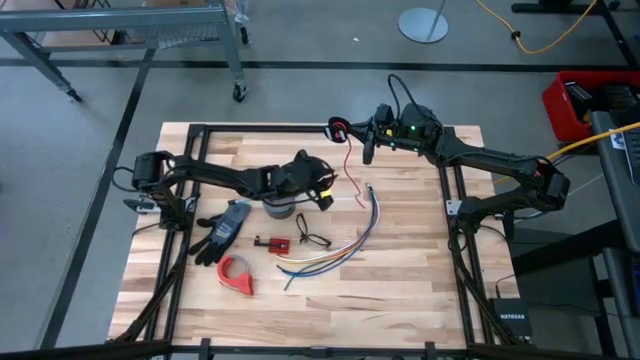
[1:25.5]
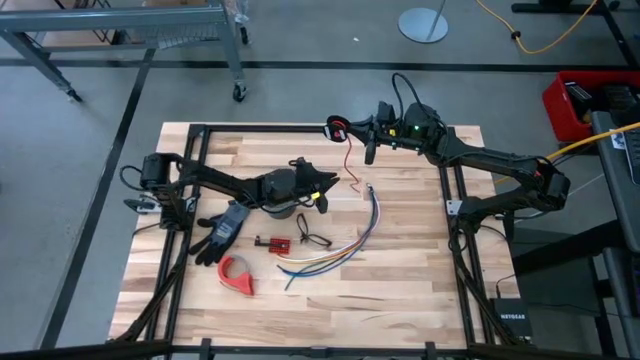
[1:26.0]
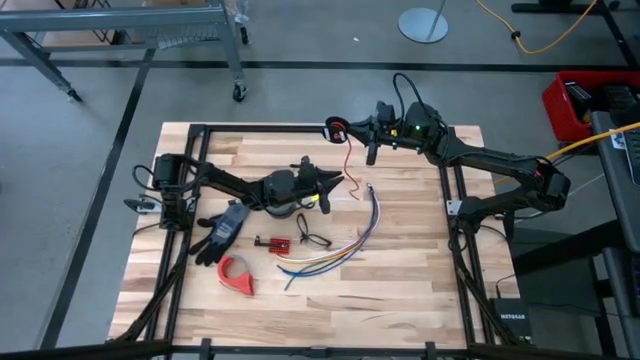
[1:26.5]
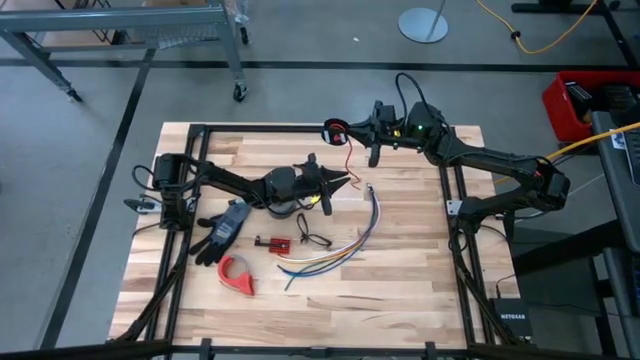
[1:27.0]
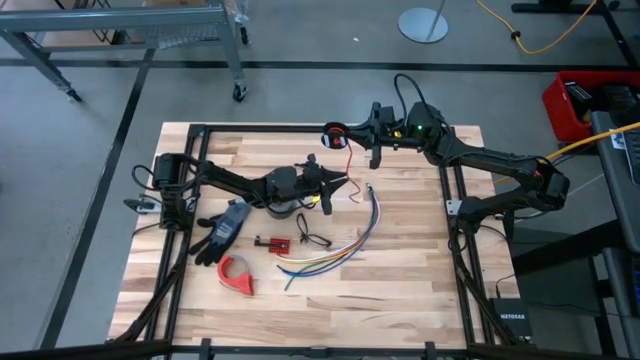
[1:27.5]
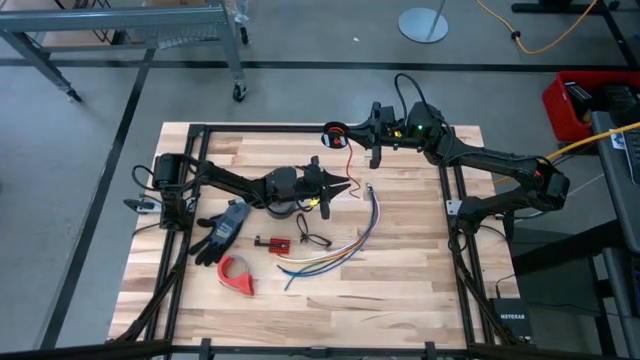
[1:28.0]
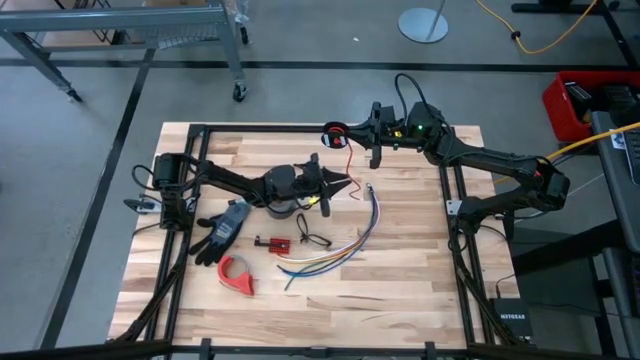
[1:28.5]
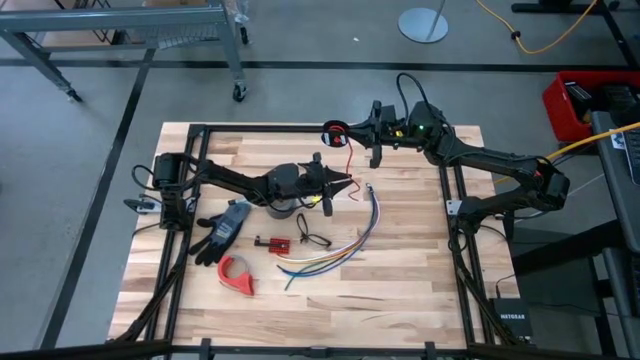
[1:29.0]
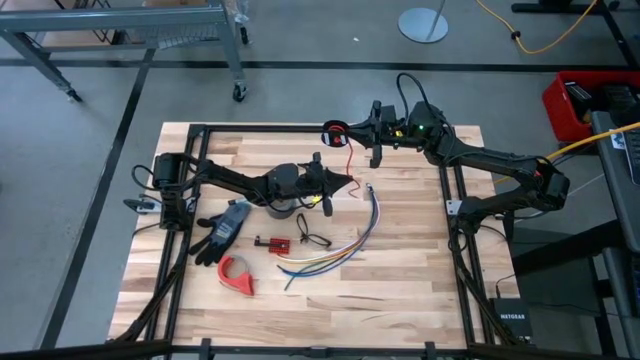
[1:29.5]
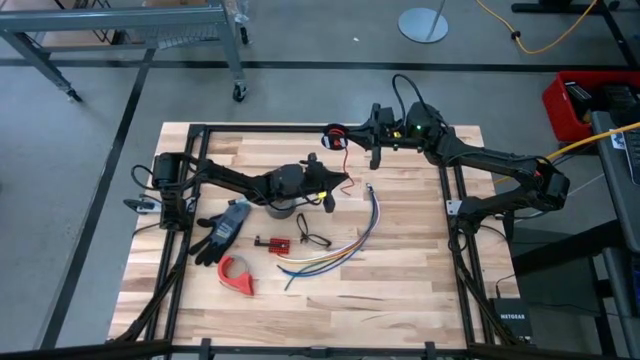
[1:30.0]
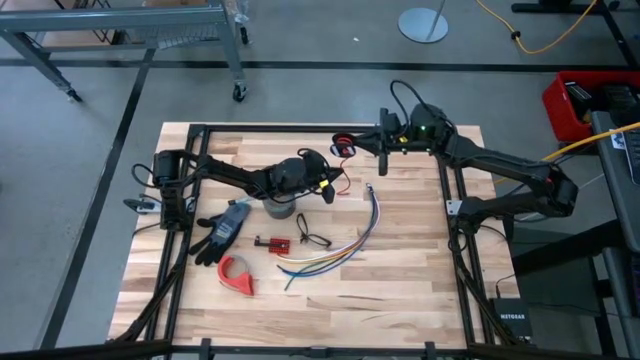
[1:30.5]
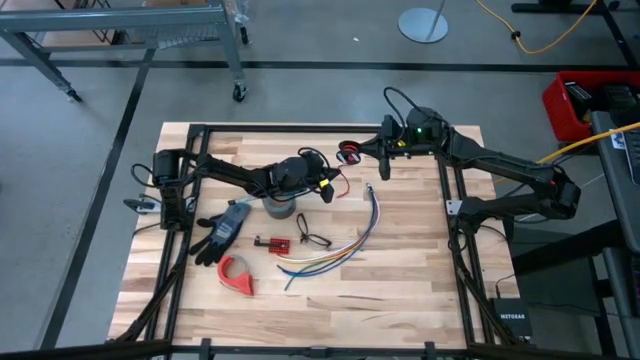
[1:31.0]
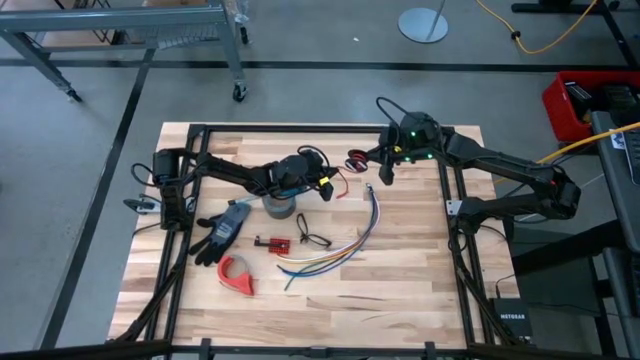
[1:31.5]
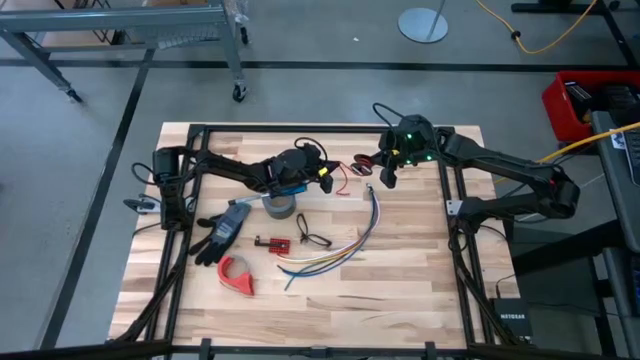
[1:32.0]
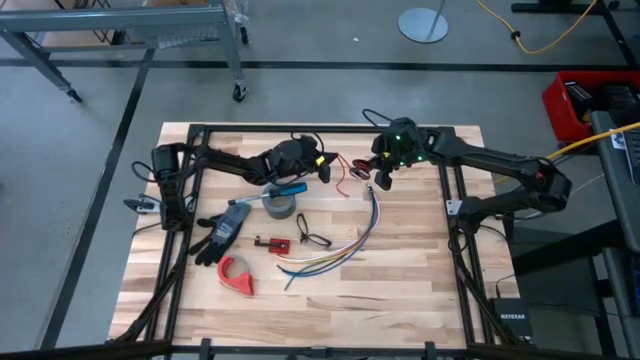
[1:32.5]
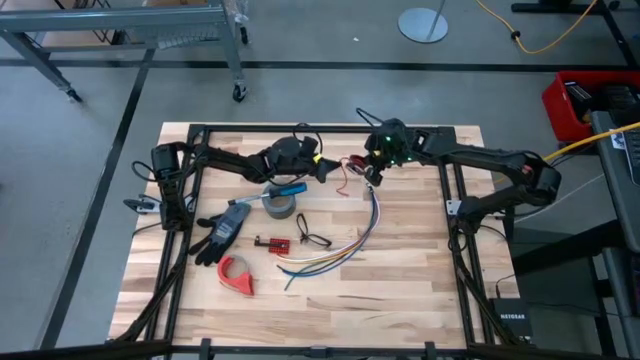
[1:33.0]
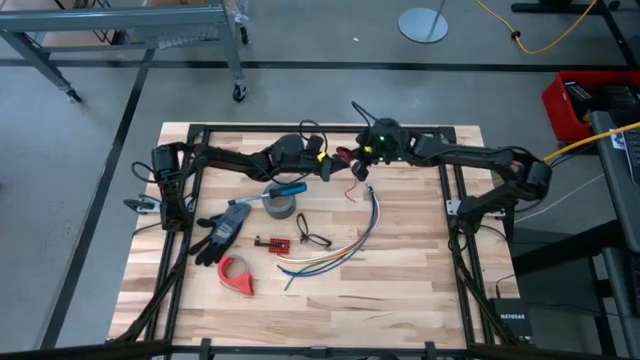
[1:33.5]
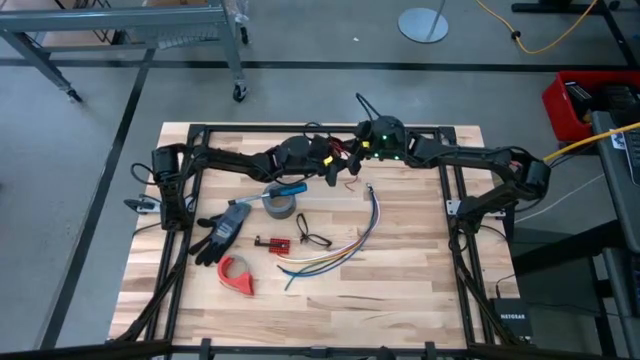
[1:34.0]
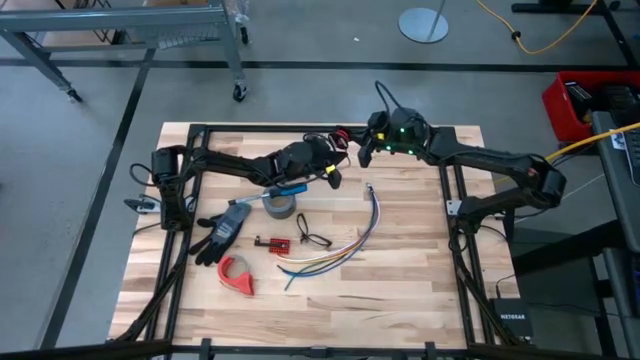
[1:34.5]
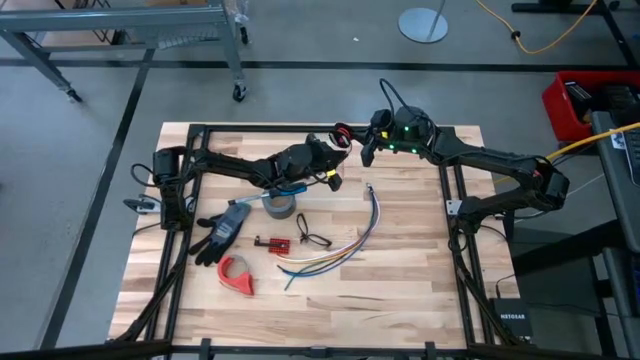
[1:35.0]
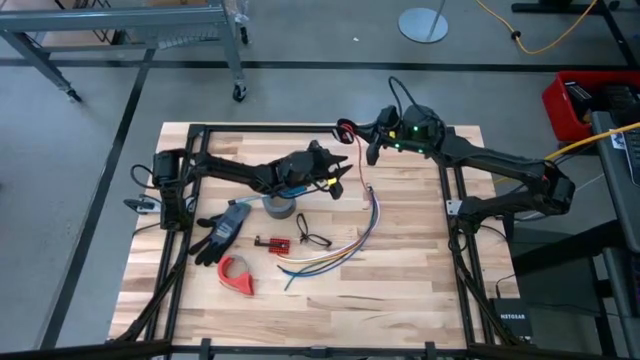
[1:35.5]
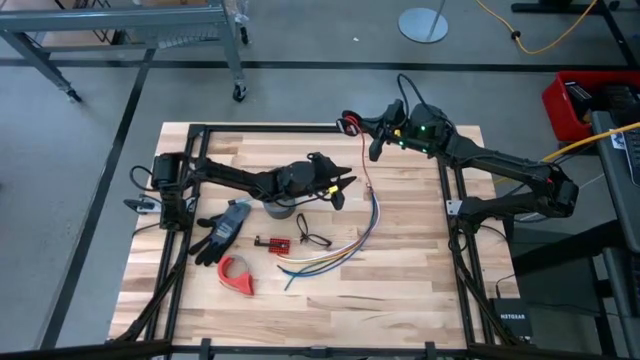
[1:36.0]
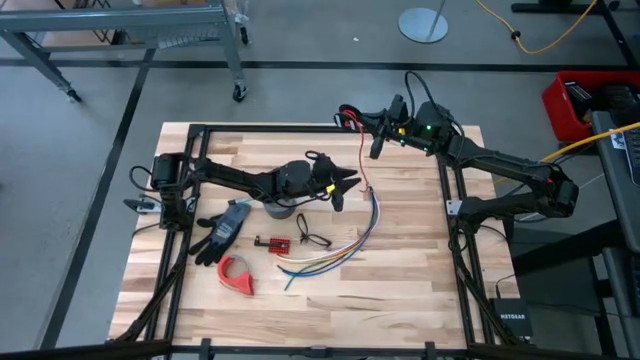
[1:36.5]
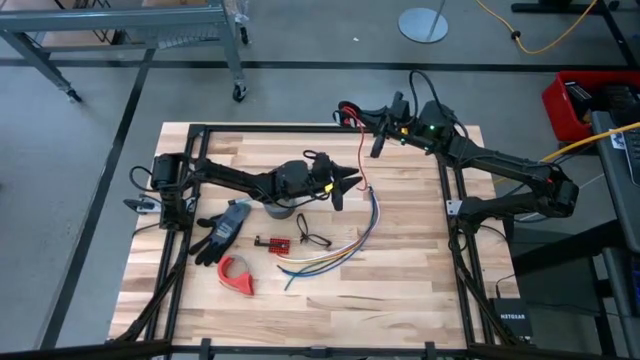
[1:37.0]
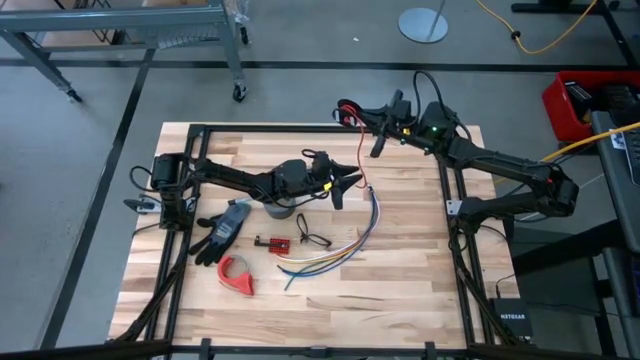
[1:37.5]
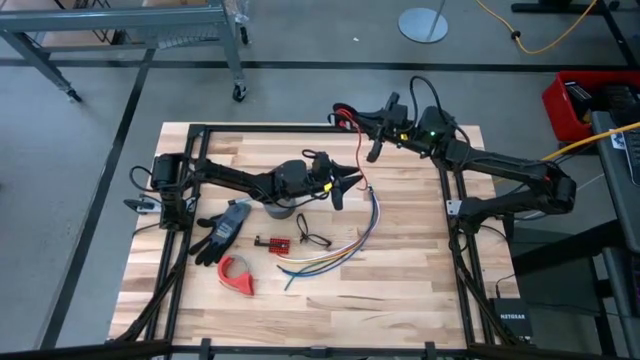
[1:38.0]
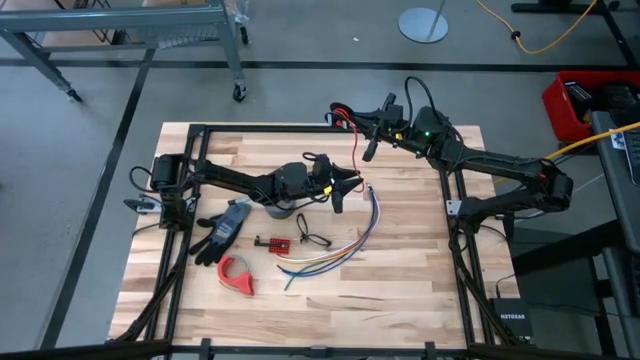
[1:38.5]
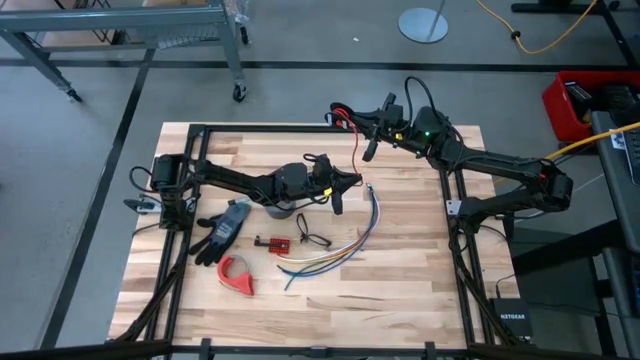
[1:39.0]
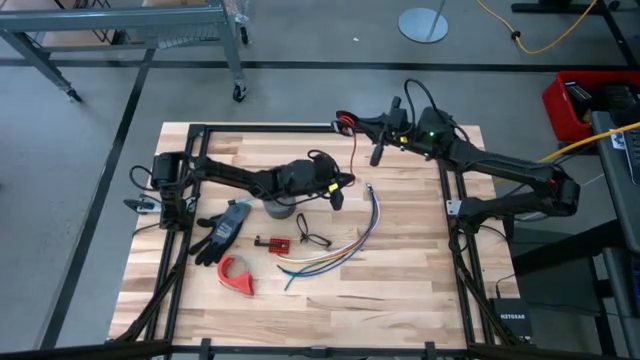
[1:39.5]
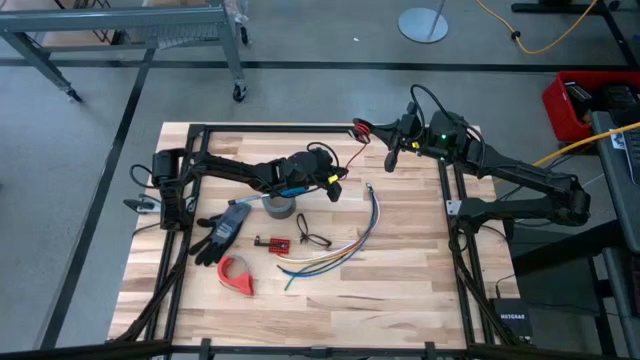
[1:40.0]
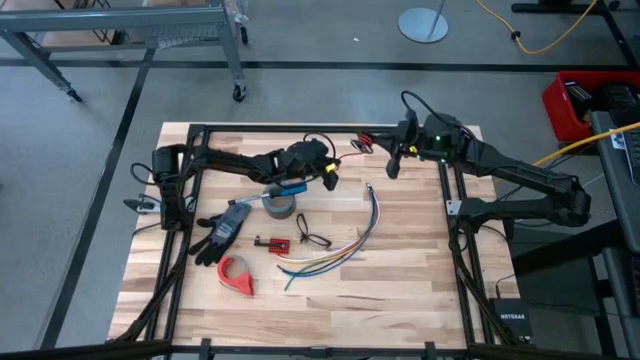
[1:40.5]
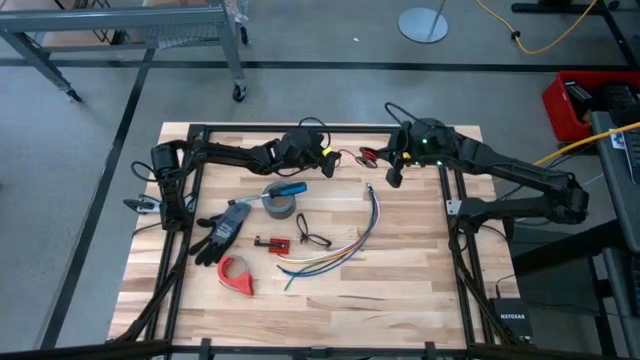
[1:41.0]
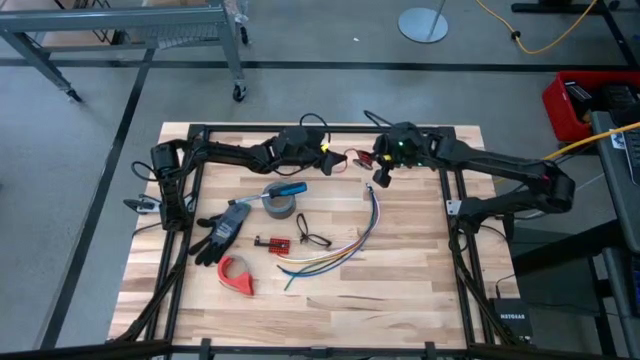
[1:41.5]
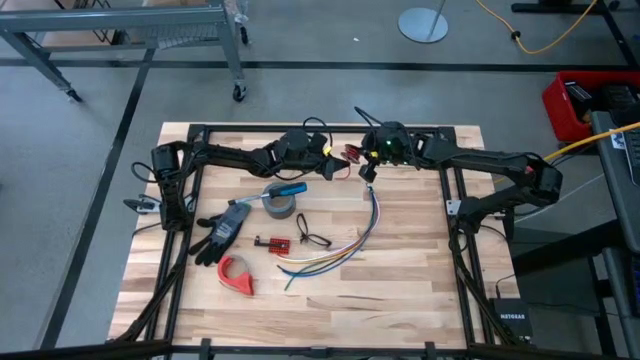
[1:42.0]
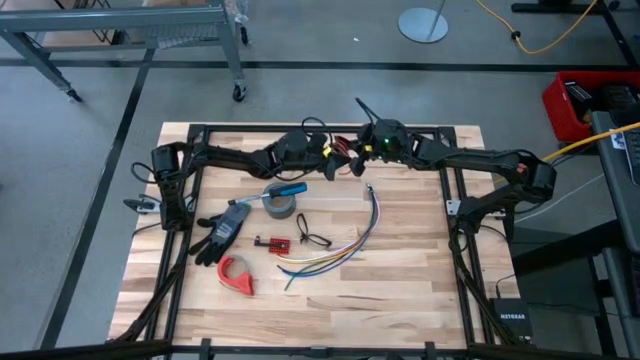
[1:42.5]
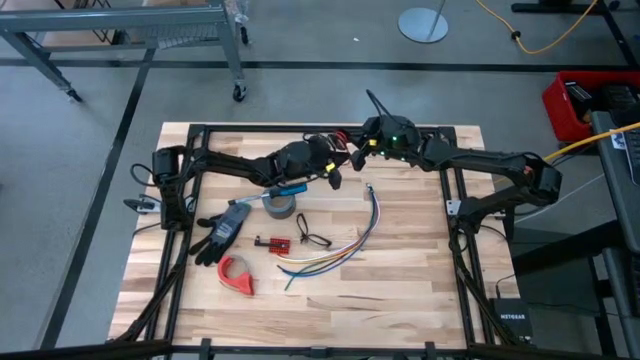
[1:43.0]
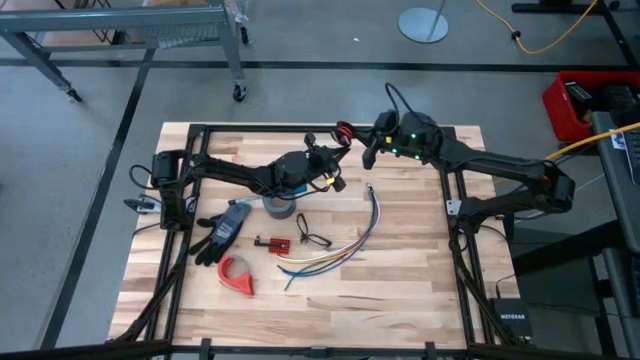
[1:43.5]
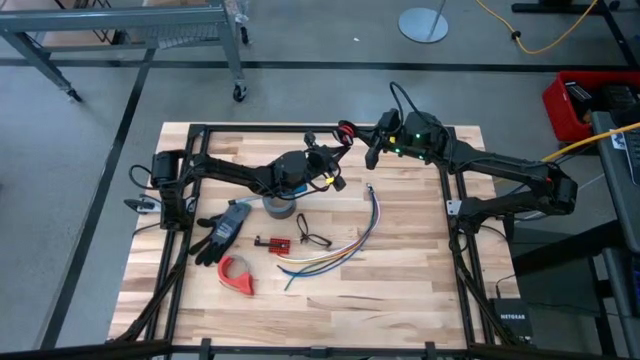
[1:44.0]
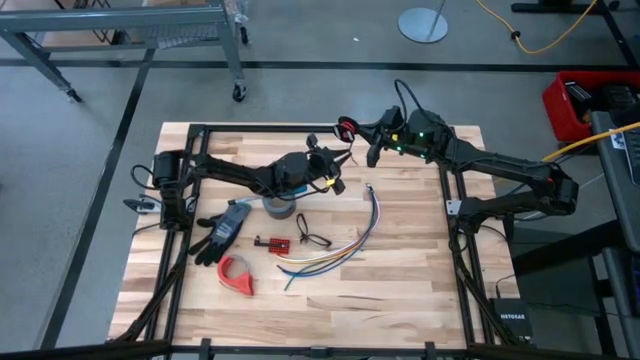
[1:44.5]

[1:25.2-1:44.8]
Task: Coil cords
Coil the red wire on the spool
